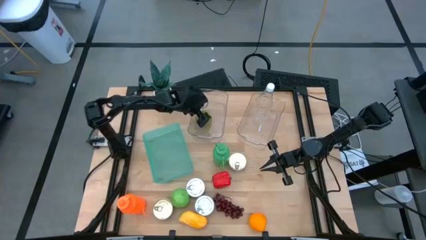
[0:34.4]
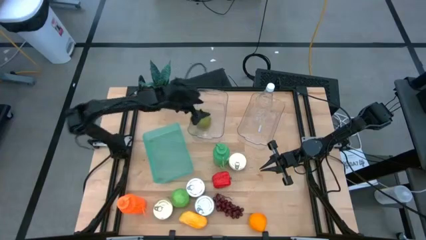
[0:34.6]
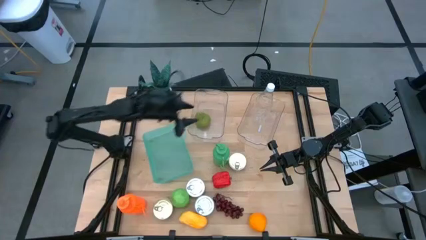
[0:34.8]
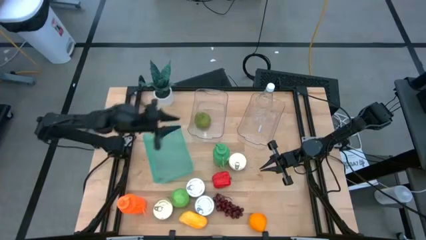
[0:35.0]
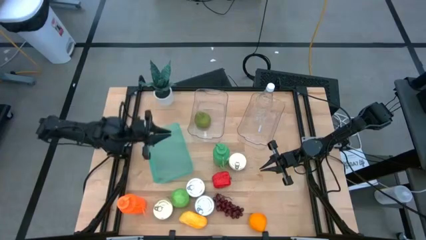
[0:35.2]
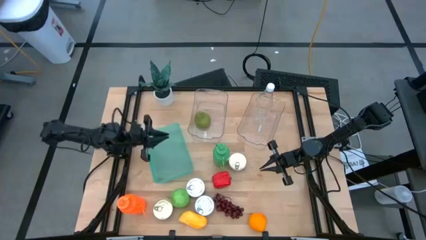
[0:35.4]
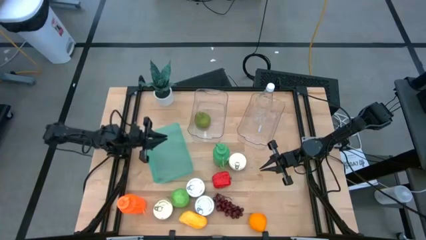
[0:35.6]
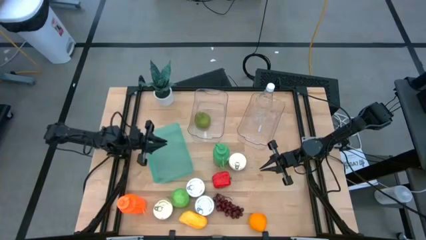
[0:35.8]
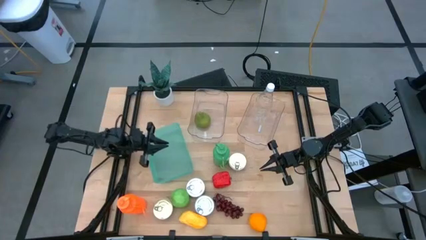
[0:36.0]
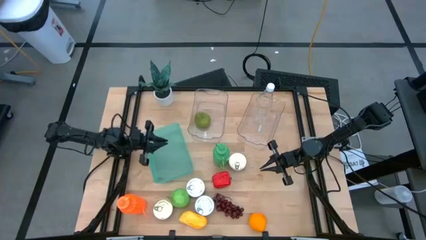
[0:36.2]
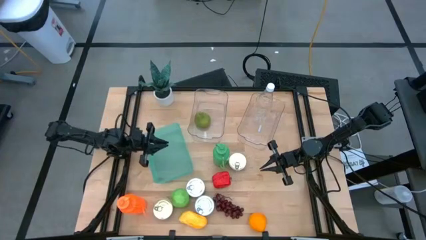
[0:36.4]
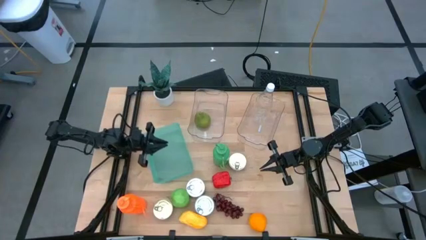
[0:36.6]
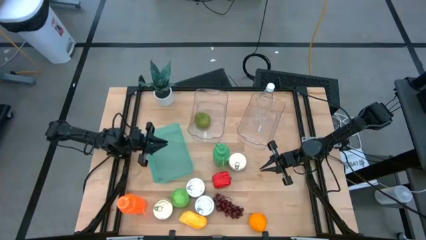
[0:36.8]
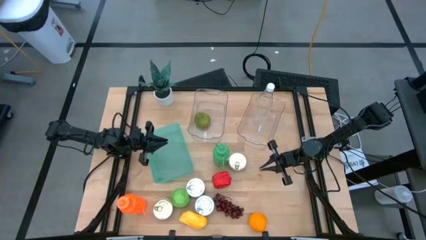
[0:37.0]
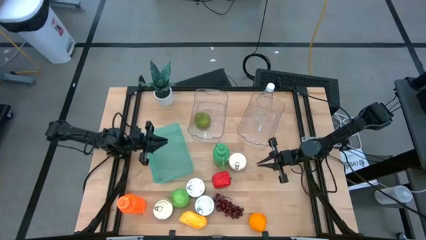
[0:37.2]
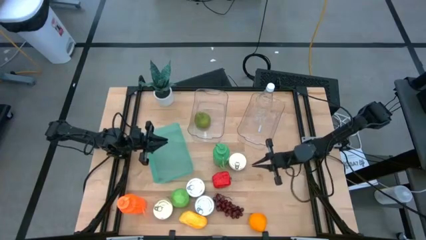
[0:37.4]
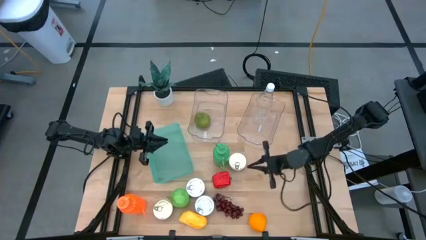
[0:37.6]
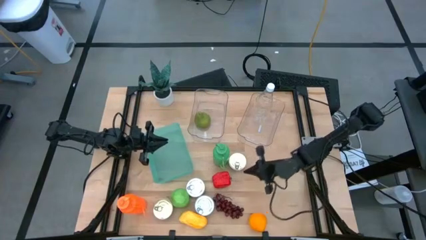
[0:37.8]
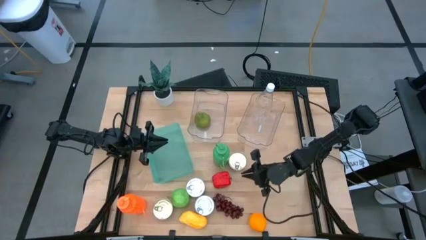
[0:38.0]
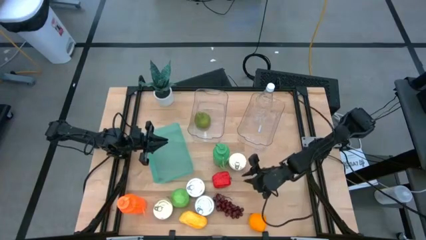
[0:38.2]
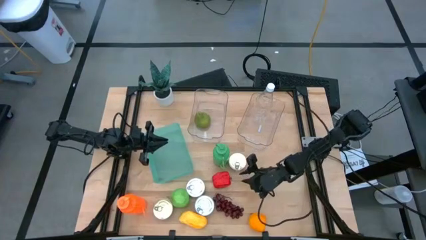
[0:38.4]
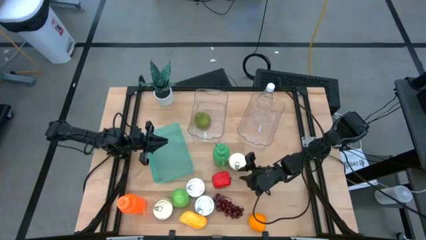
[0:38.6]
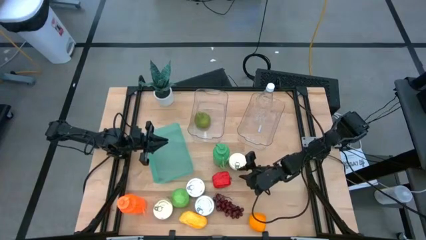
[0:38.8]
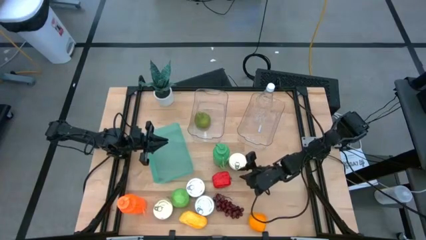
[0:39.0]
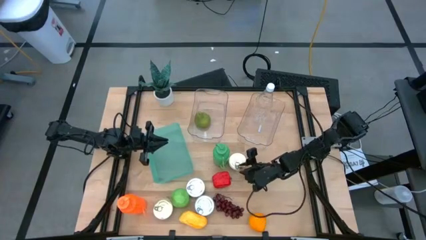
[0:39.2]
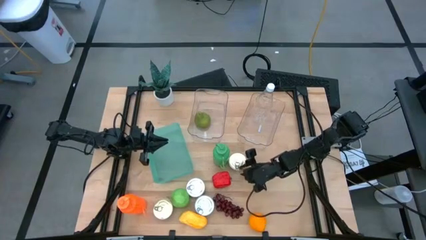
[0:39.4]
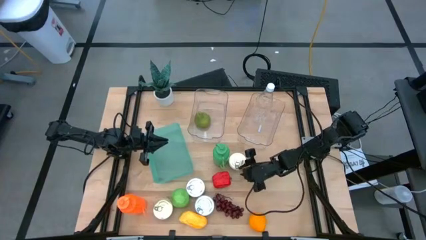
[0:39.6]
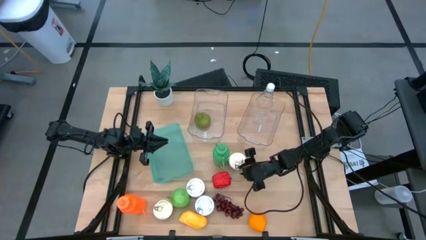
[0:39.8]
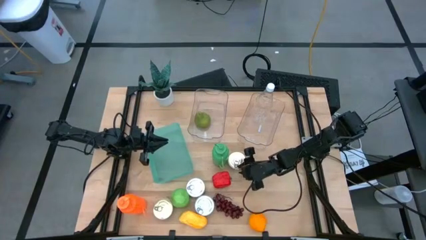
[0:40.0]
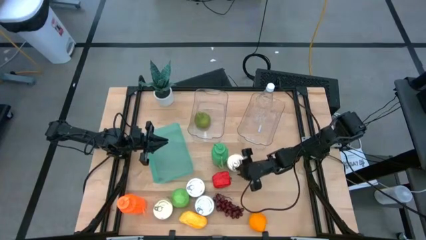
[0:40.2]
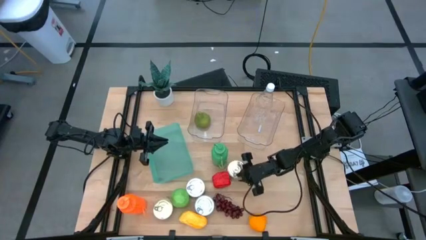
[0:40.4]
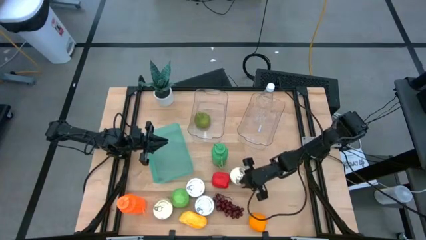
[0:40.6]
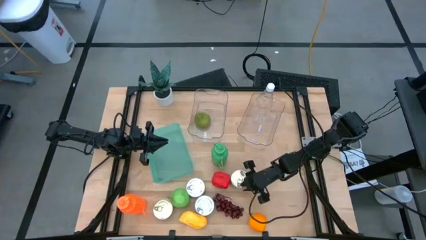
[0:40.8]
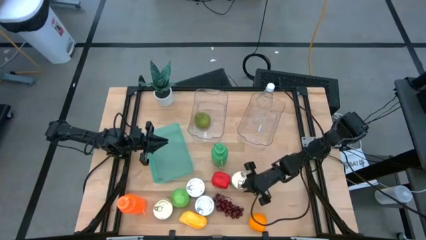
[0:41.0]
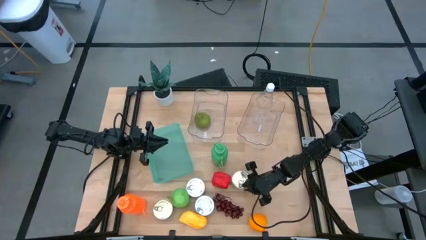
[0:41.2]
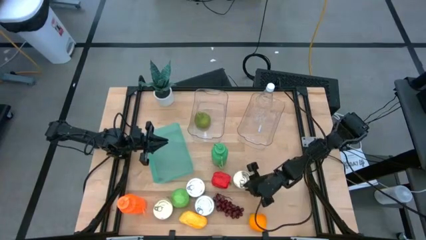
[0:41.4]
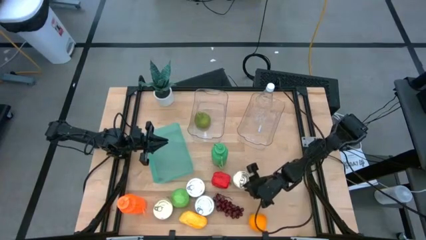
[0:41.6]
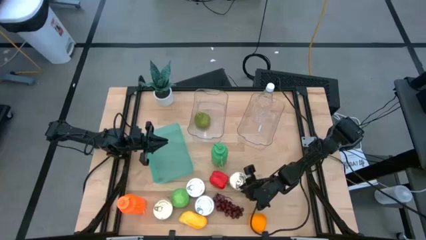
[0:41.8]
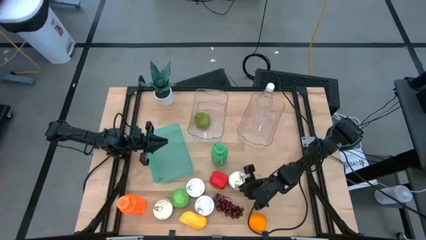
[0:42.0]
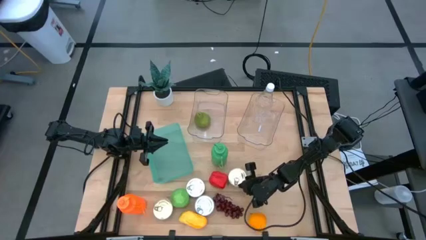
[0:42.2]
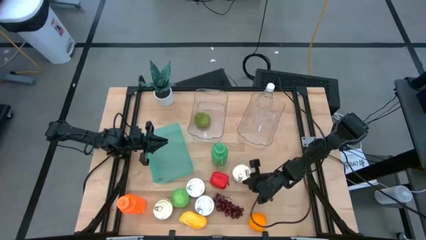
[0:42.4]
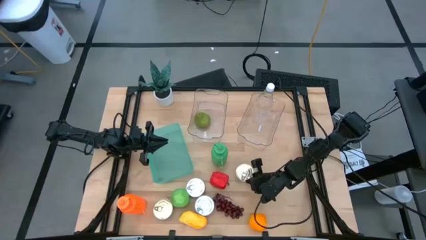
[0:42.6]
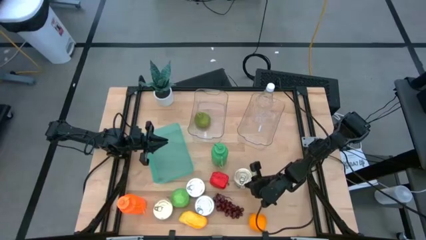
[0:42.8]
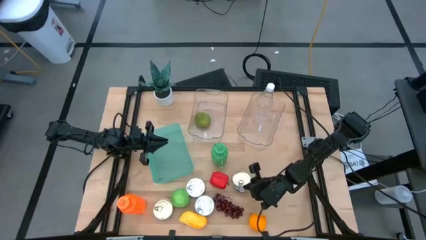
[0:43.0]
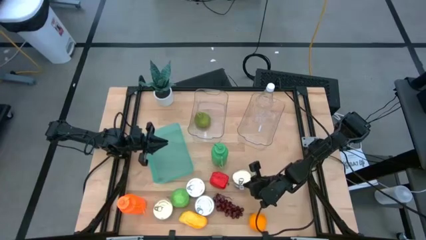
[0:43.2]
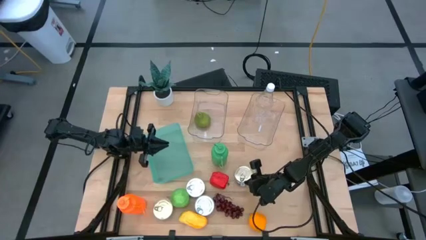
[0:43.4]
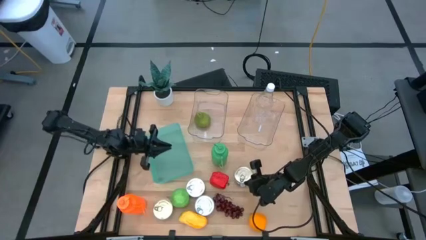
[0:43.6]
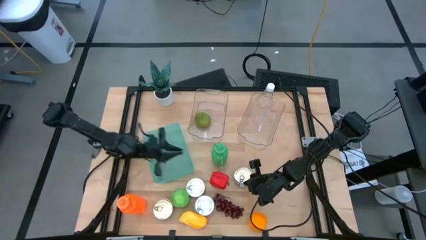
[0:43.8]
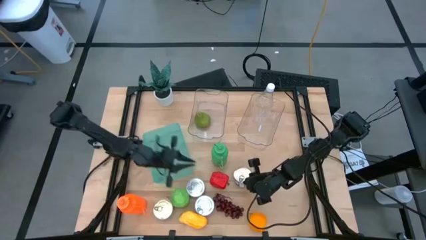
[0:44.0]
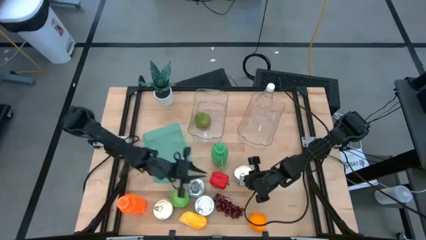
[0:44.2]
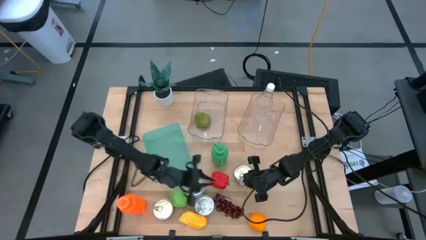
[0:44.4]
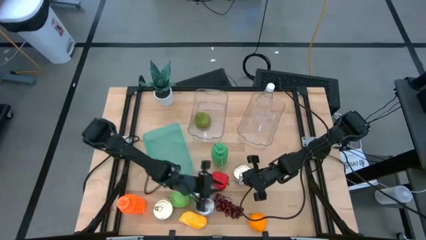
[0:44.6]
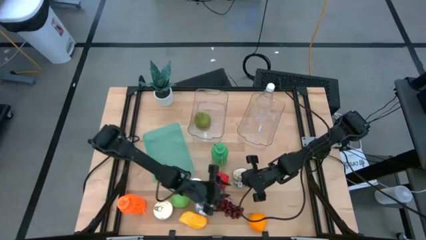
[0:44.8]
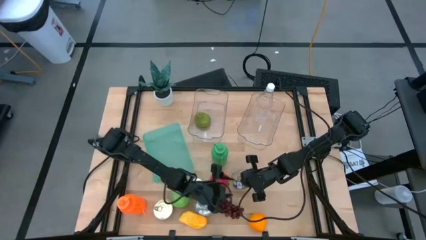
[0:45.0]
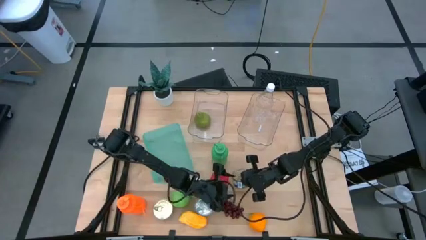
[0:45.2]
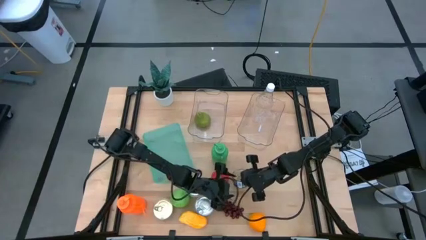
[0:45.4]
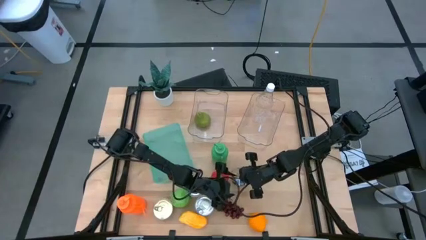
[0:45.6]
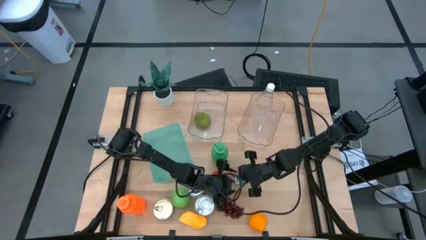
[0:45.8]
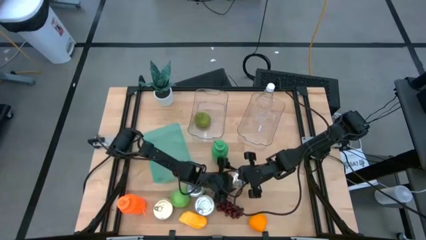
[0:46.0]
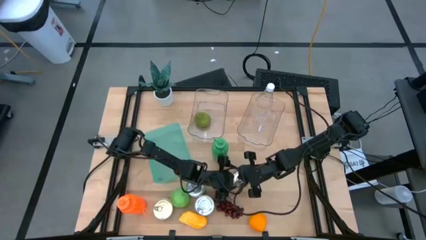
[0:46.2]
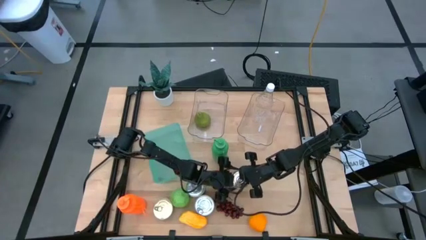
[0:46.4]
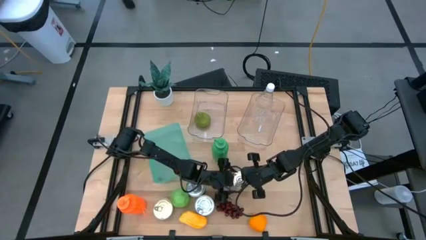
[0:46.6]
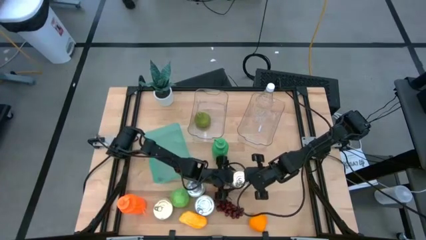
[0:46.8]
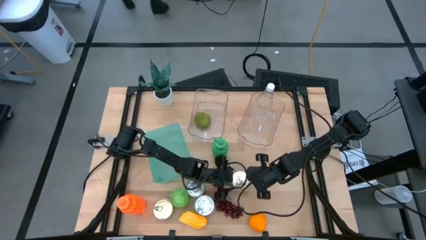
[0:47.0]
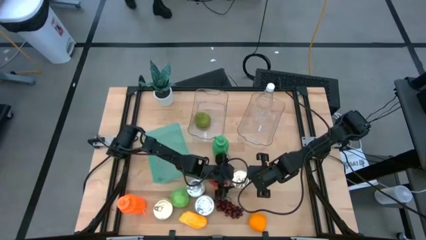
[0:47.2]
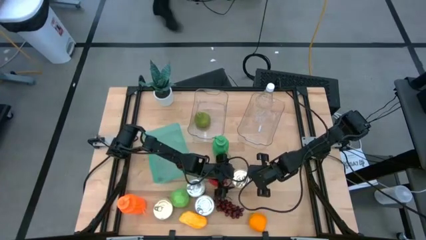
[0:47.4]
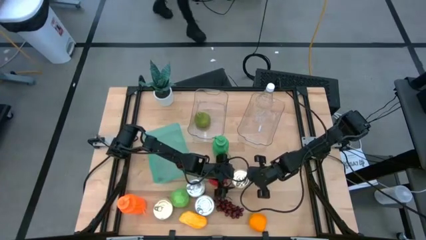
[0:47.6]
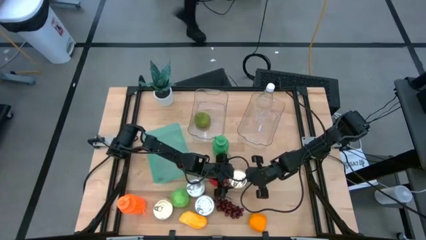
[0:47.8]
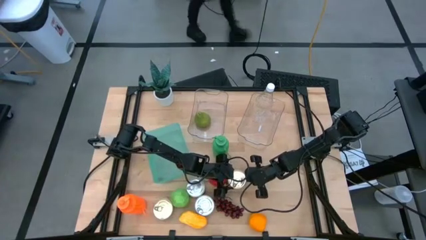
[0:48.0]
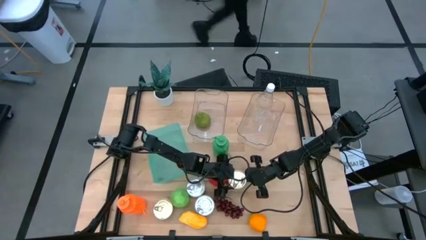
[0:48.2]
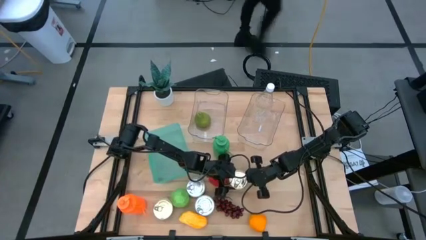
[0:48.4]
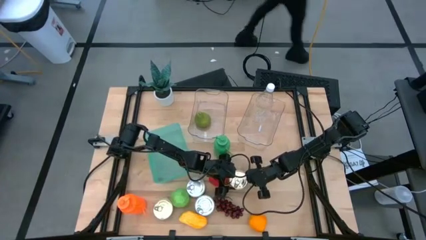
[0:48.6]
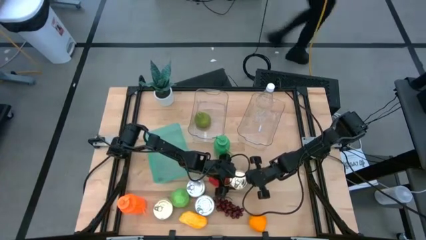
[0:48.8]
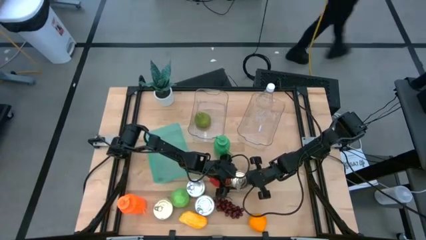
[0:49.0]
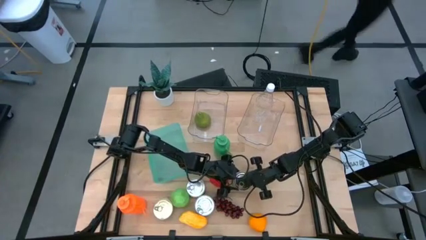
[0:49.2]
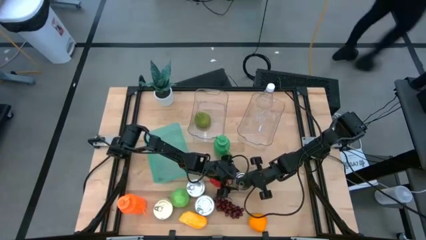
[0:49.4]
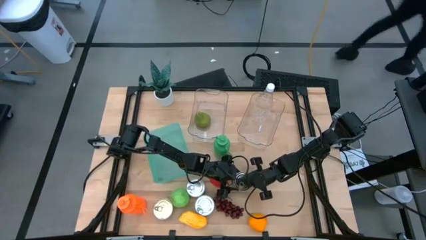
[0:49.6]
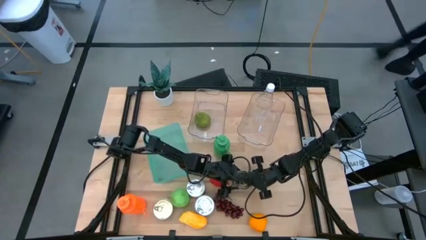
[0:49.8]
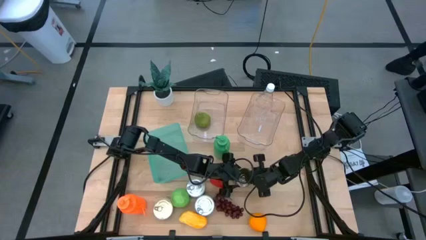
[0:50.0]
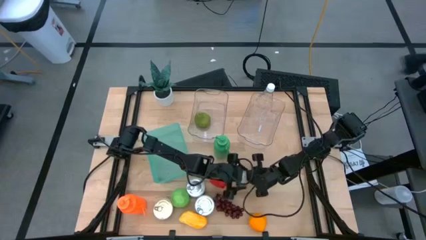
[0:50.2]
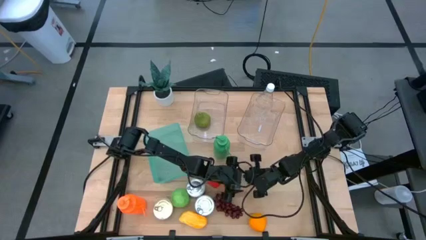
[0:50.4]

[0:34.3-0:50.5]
Task: Pick & Place Food Item
Put the top blue and pink tuna can into the green bin
